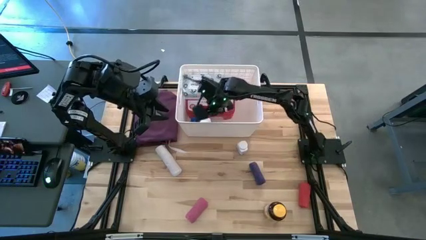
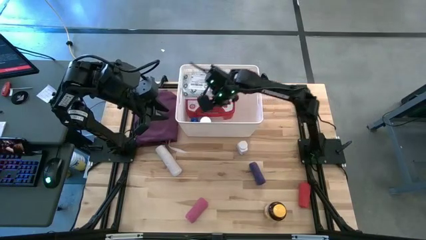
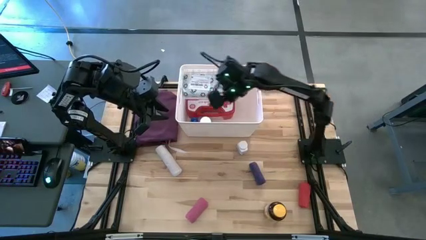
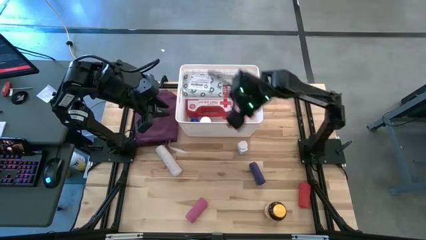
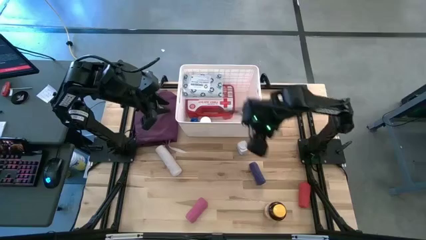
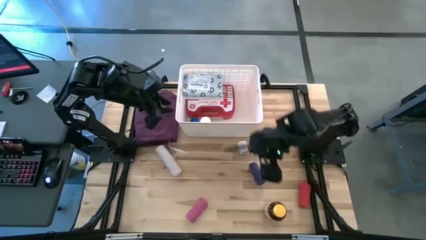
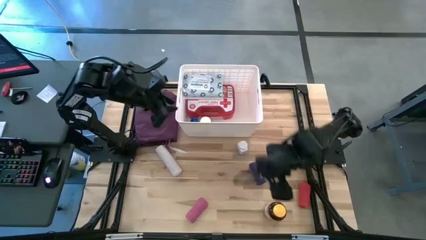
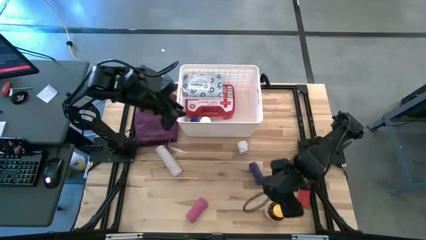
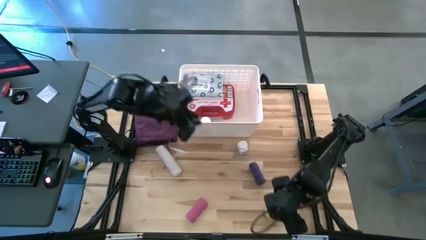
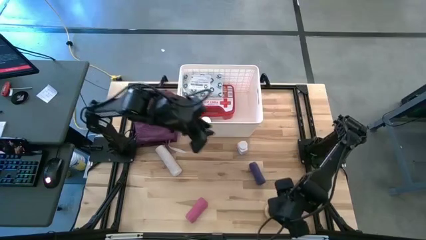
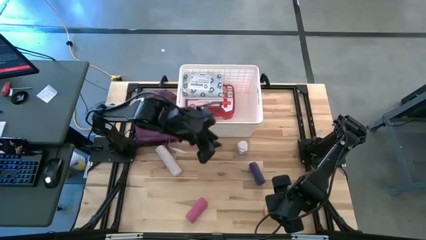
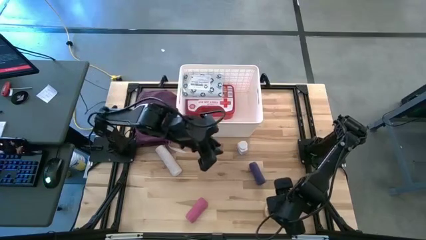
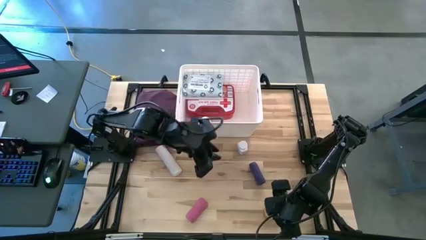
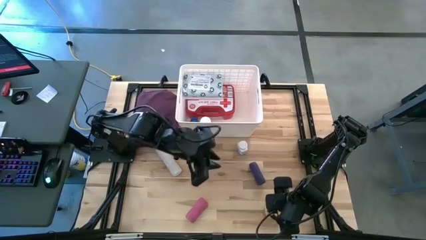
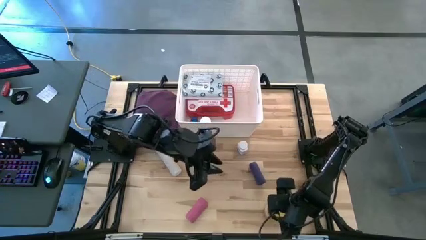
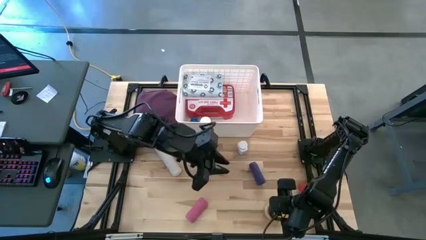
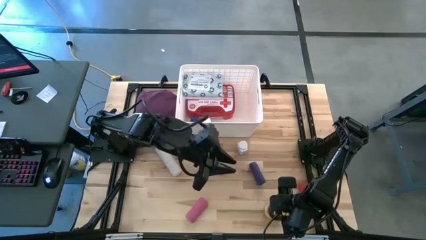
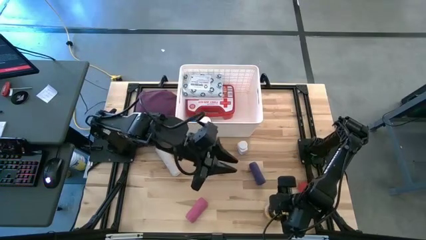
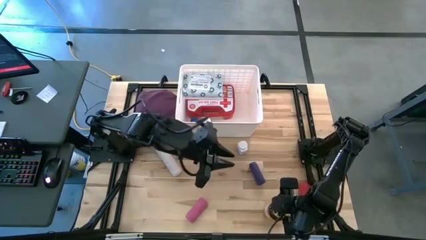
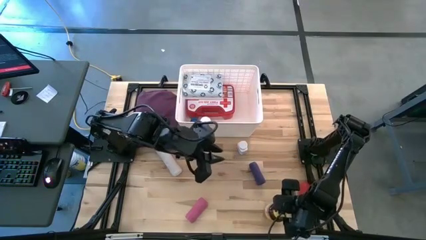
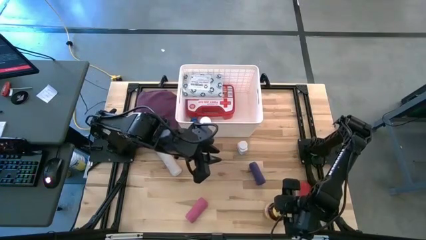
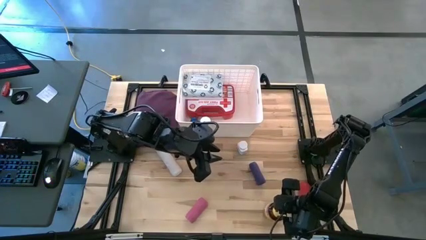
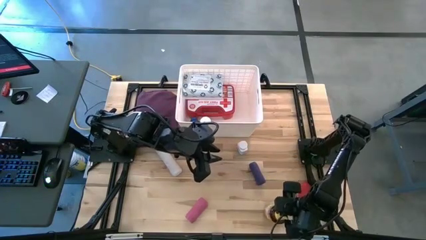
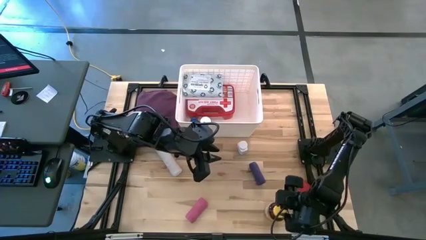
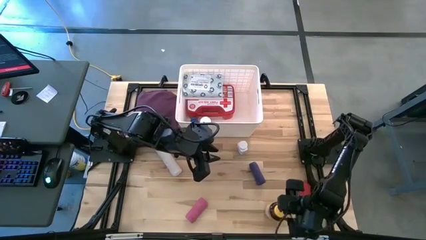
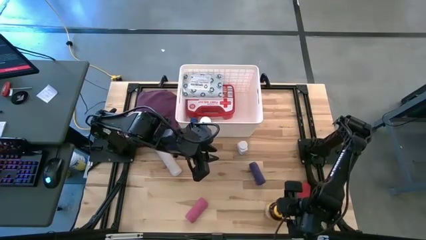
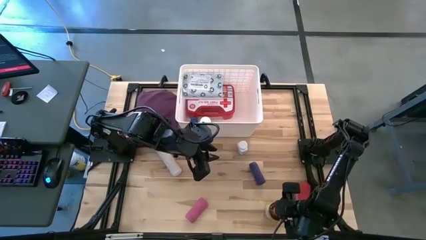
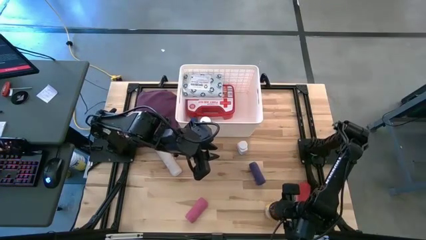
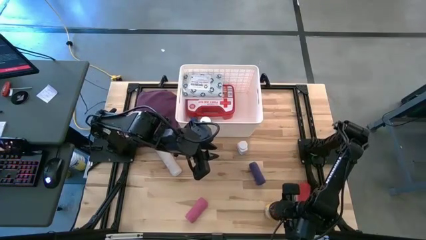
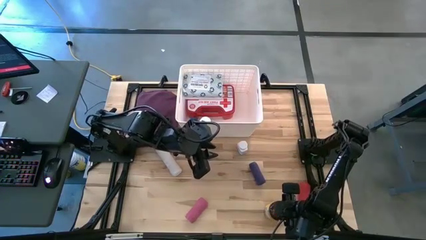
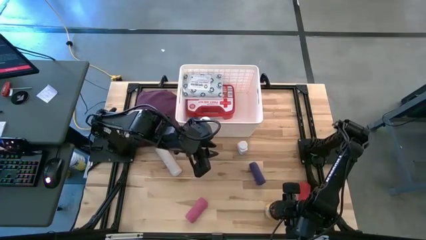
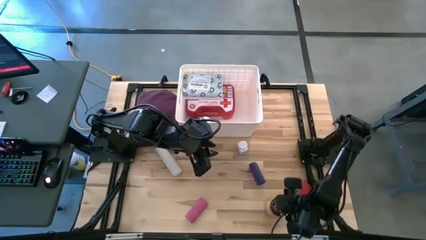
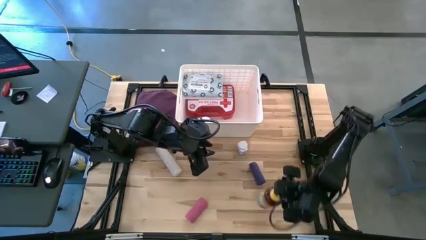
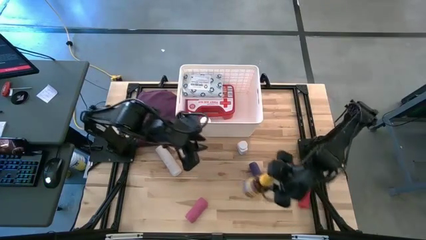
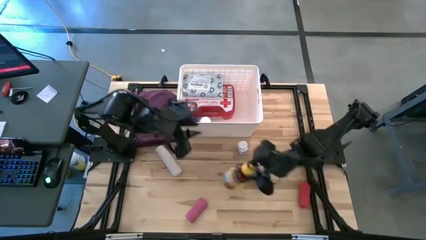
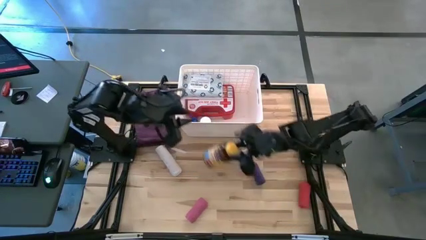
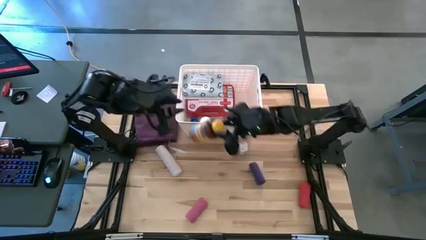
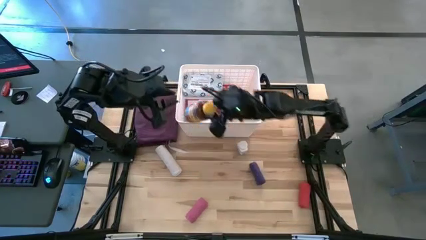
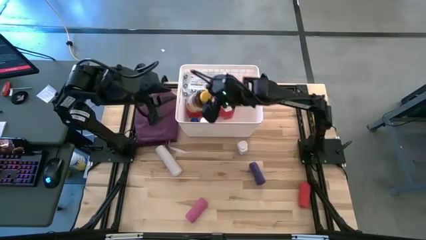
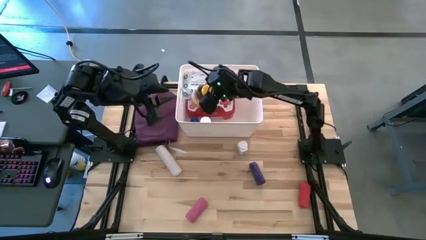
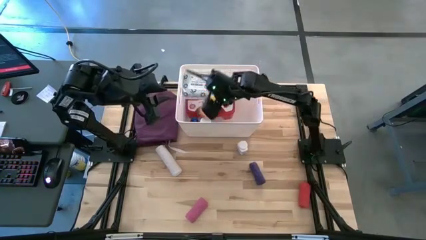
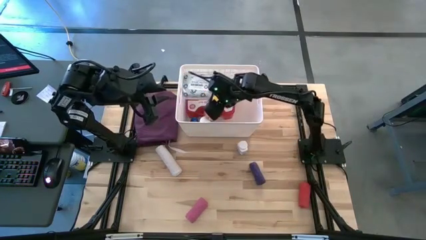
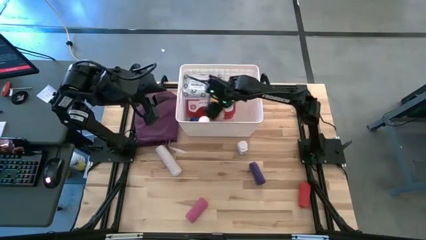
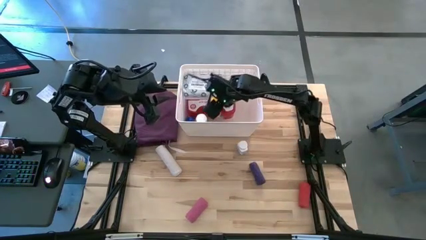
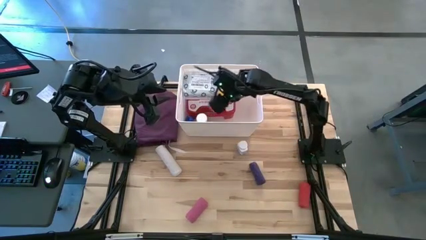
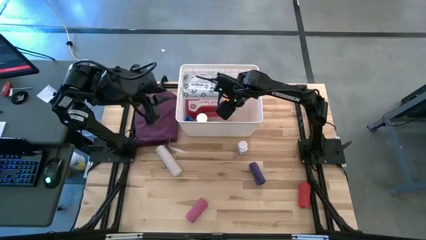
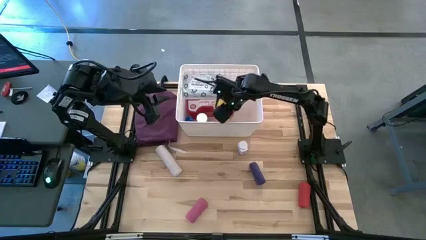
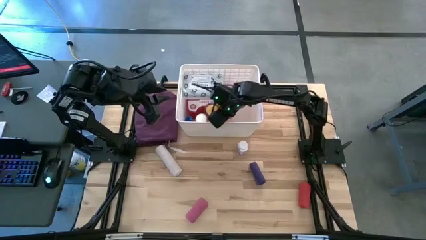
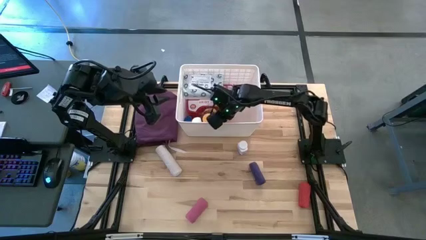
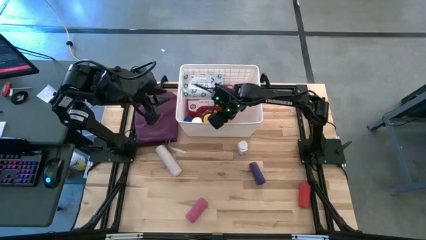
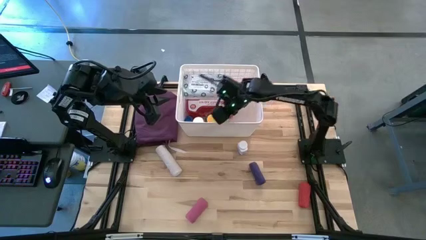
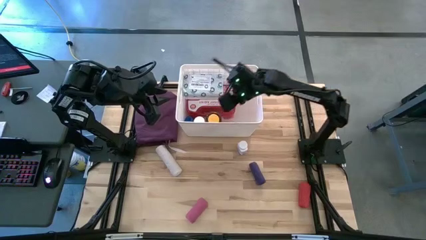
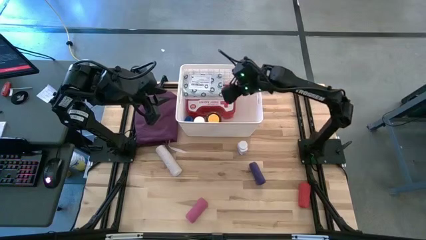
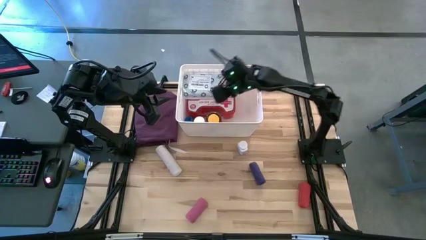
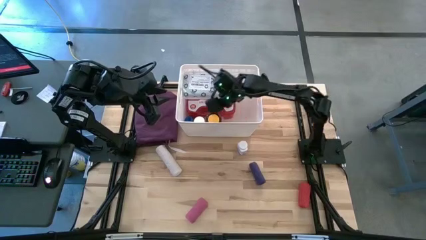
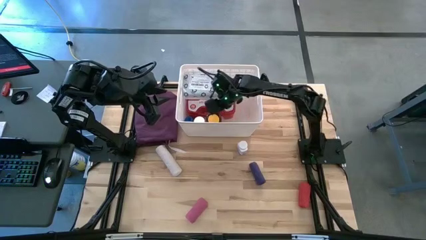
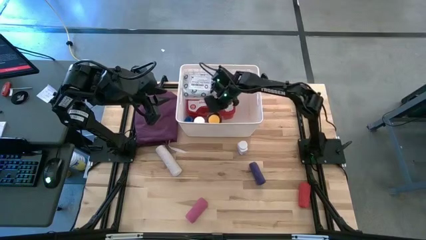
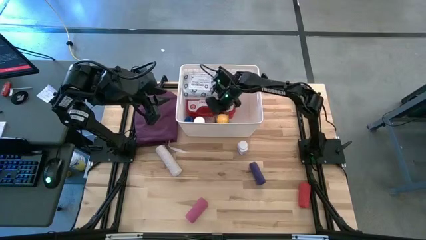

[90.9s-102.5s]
Task: Pick & place medical supplies in basket/bin
Put the yellow pill bottle into the white bin

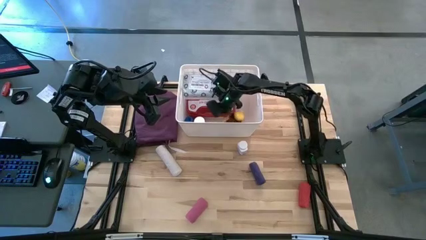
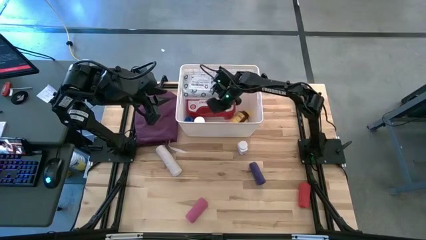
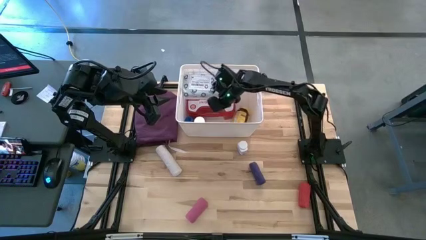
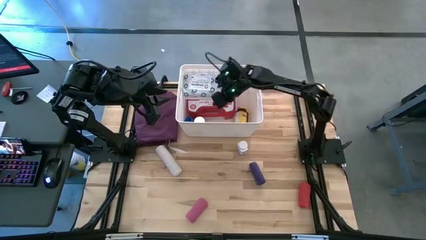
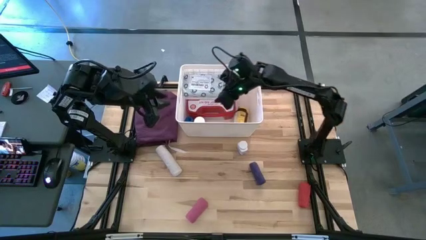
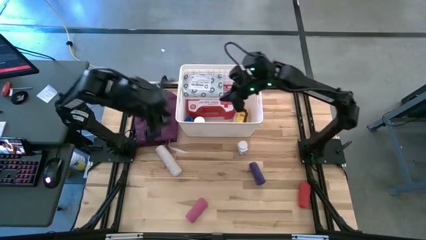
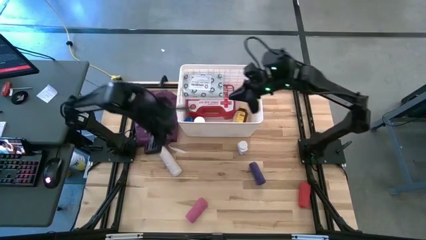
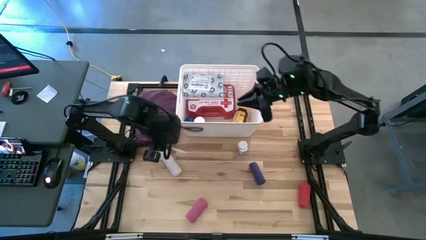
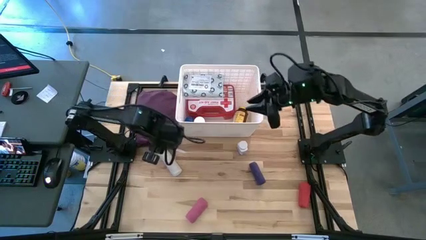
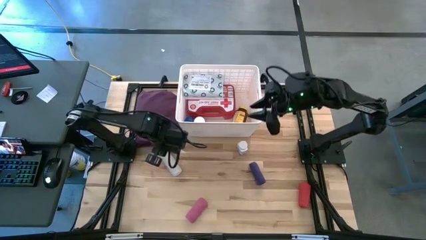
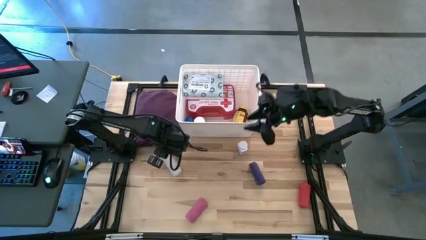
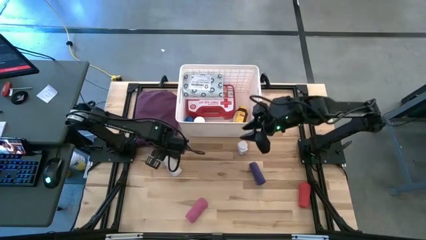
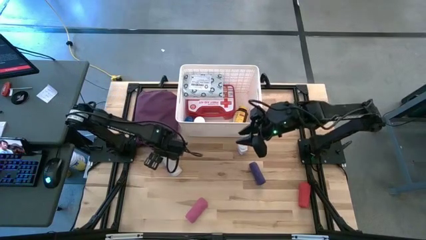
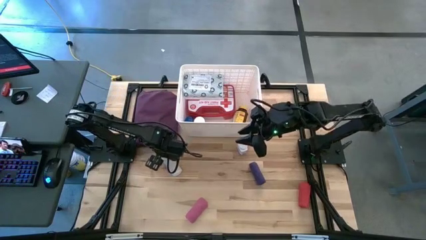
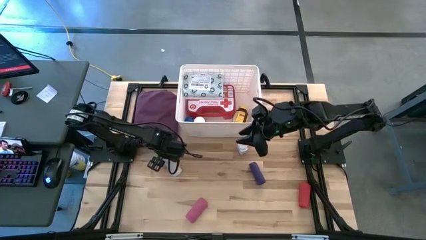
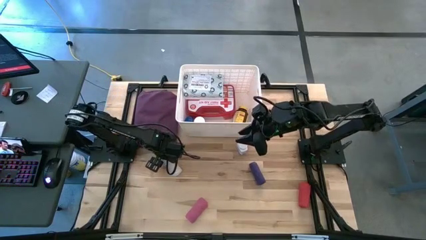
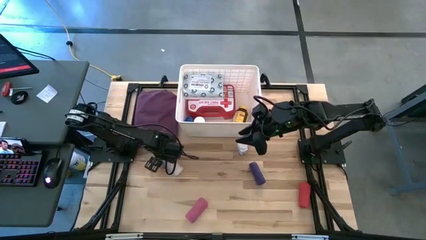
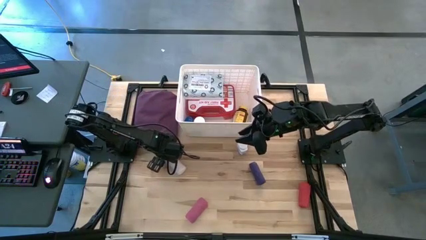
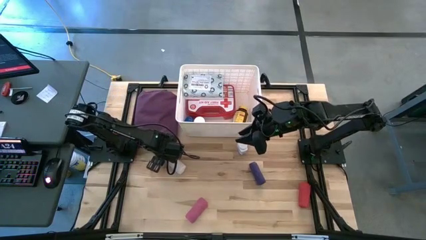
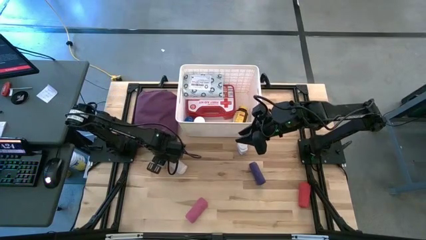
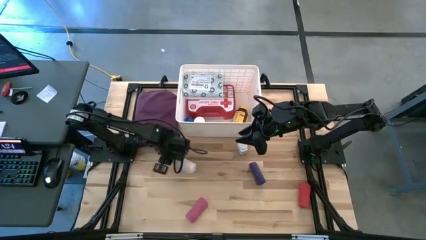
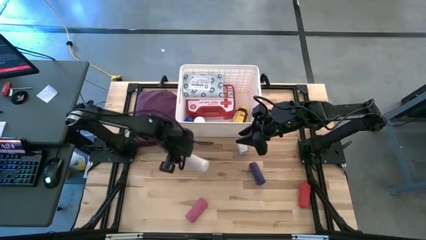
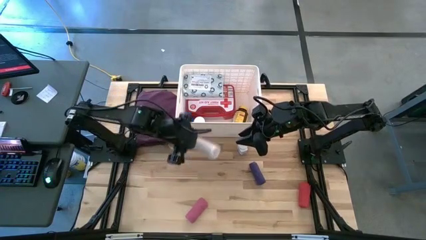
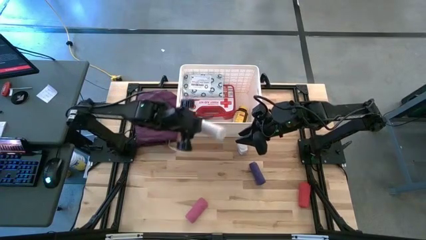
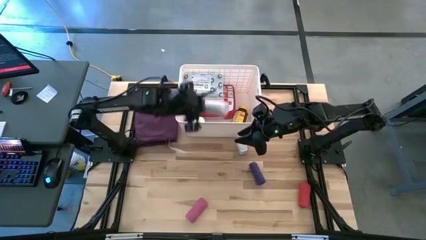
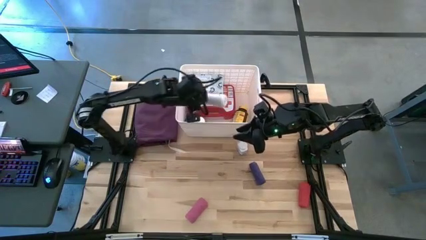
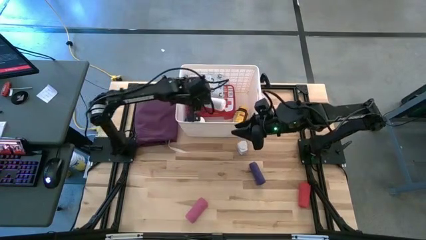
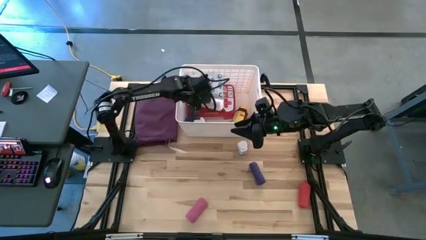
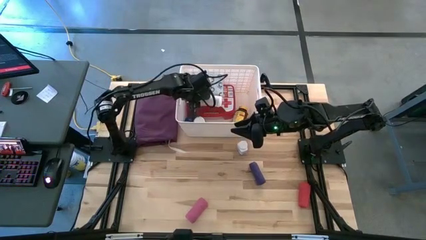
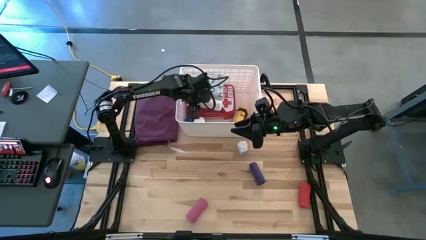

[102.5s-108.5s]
Put the white rolled bandage into the white bin
